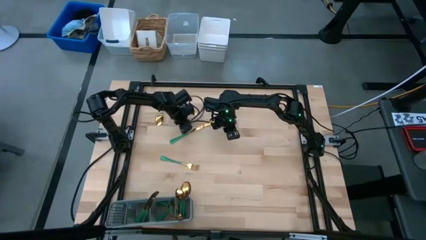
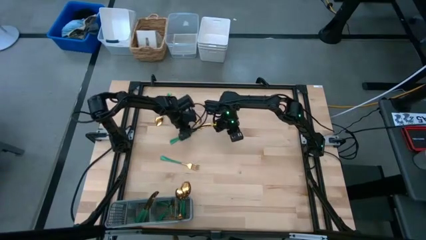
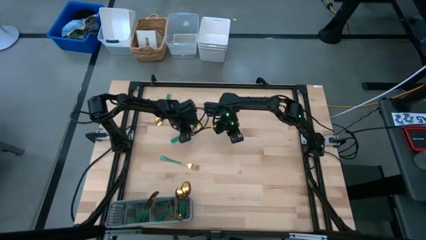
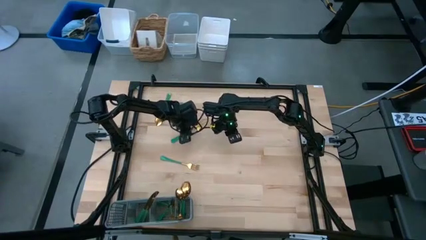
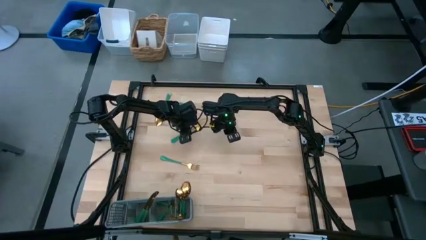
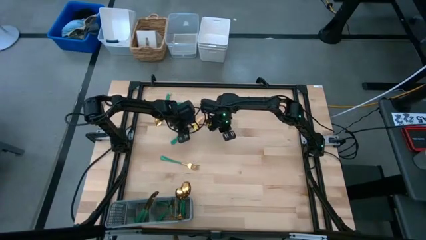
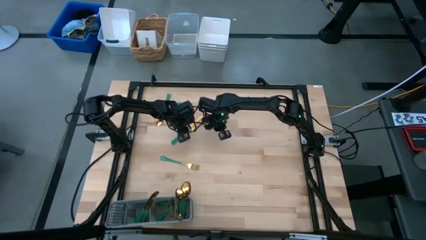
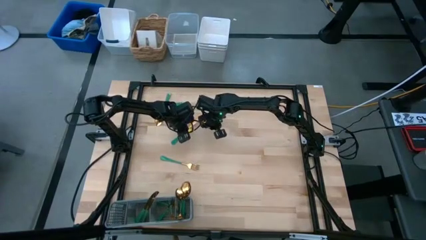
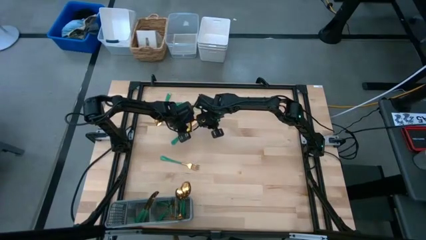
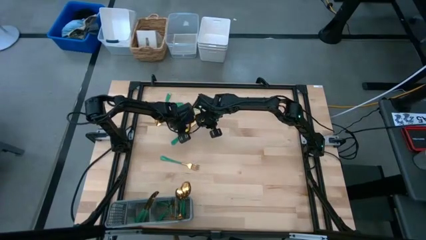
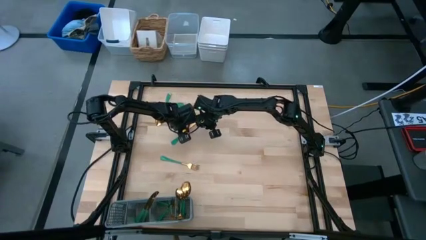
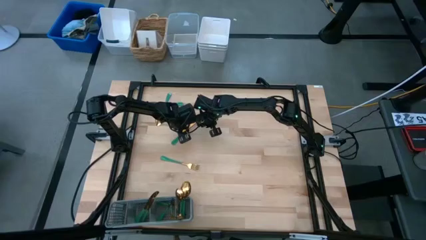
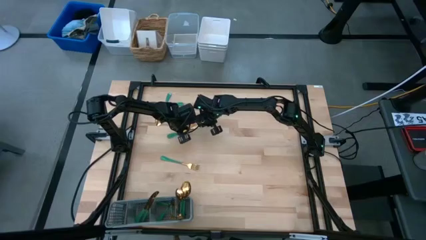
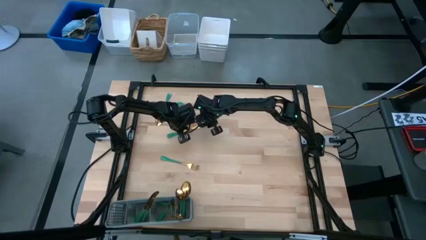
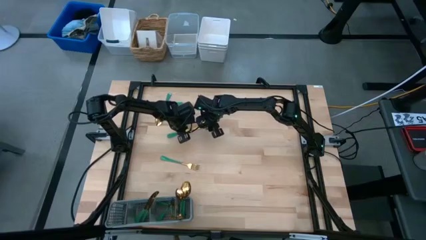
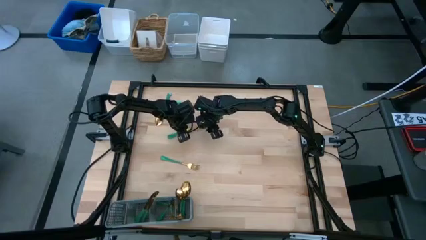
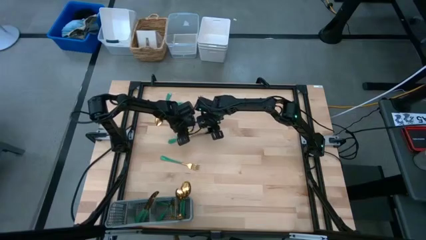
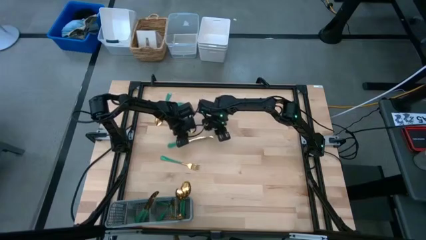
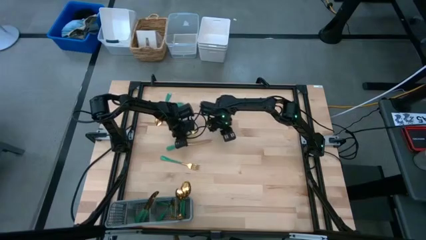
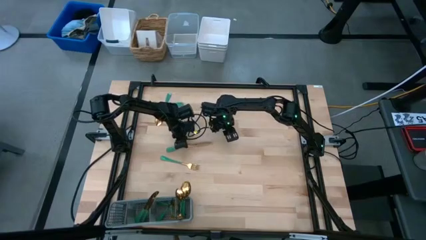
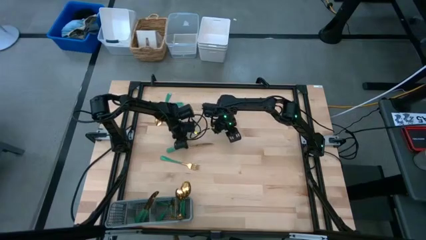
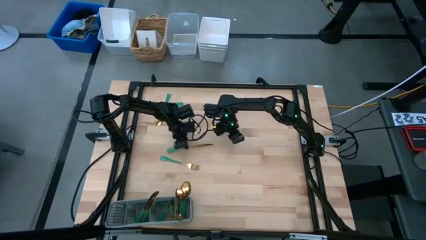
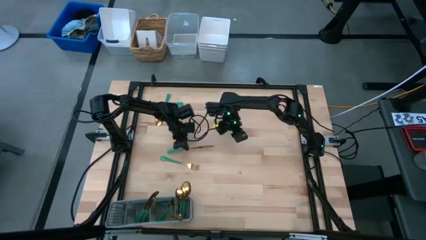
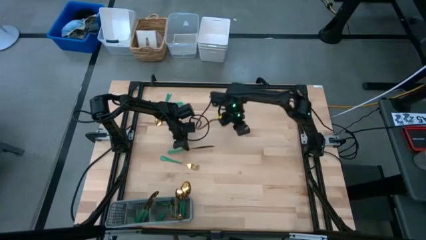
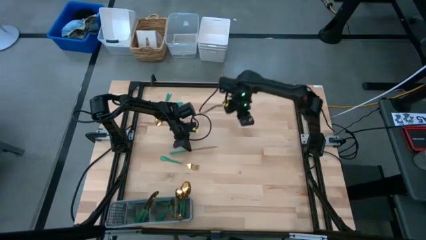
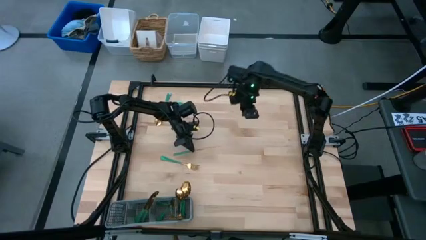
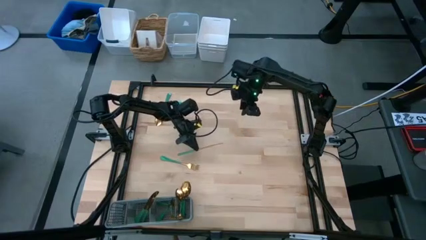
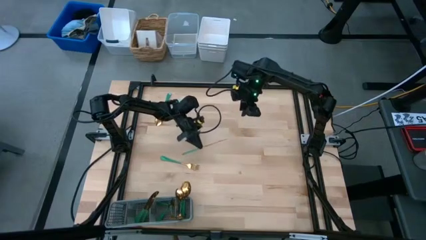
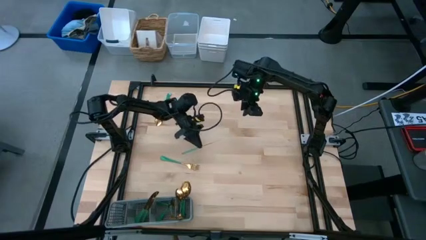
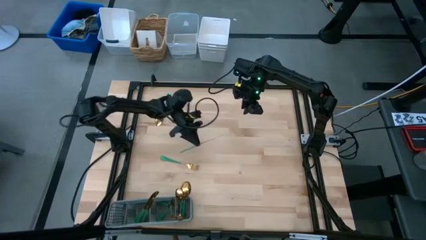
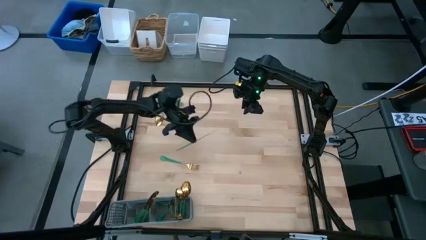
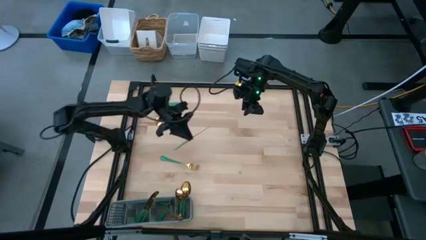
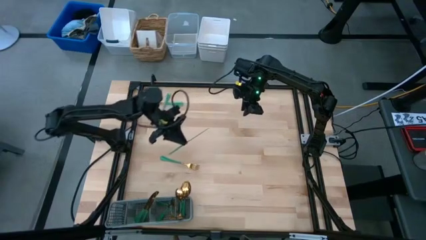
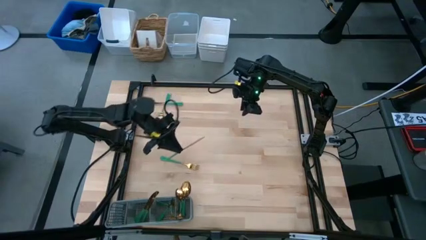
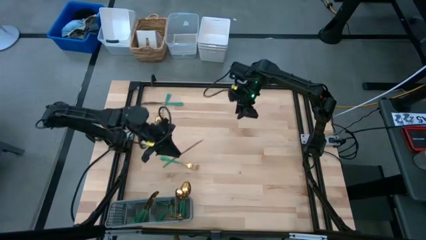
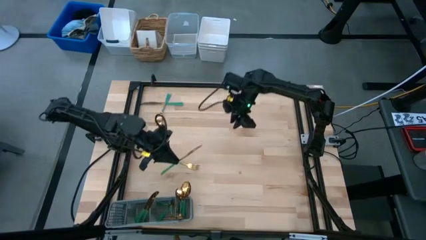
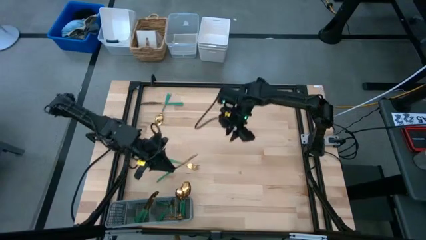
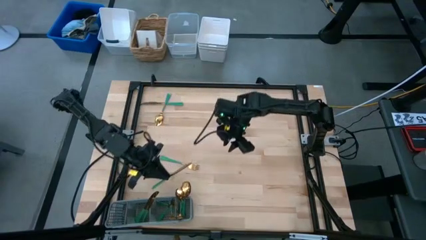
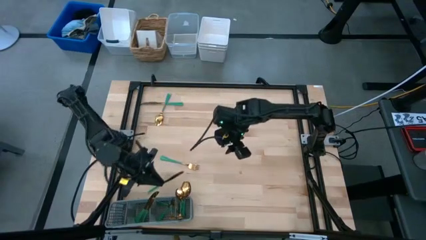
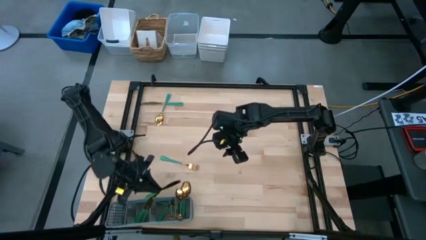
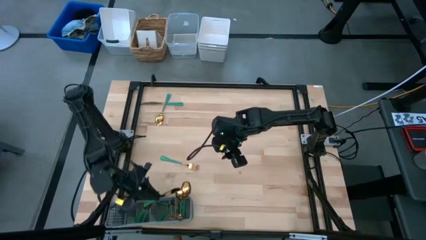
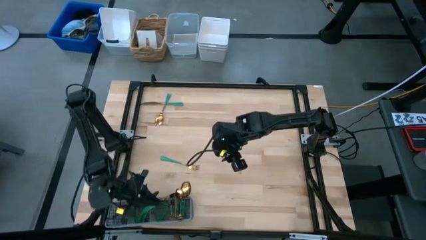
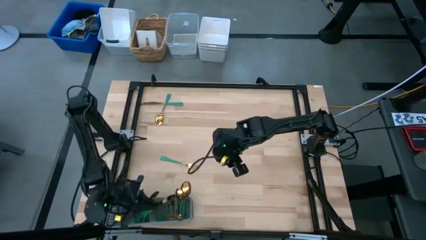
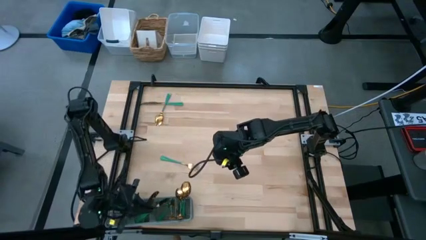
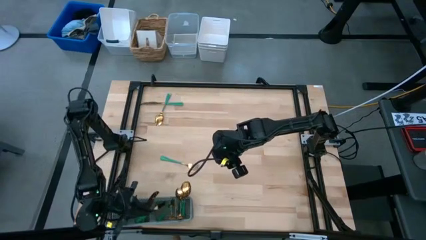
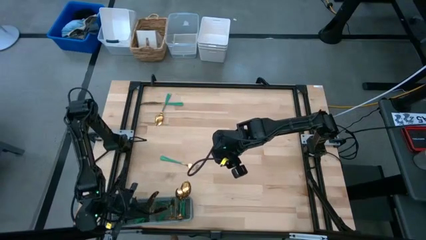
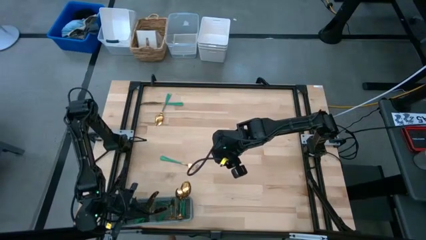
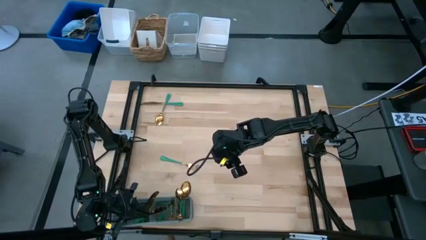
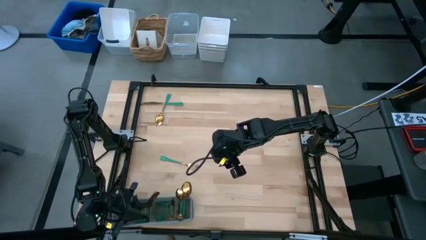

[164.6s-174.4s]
Task: Sort silverware
Put the bottom knife into the cutlery rack

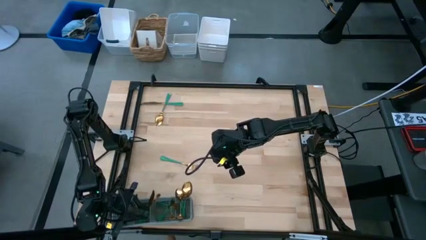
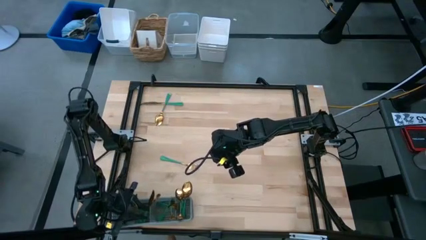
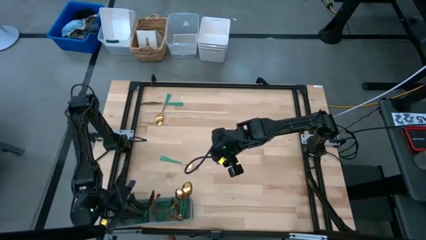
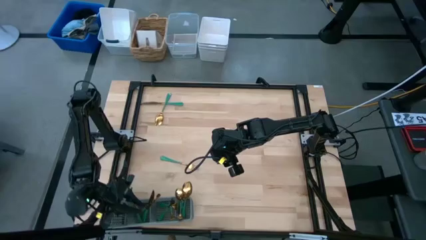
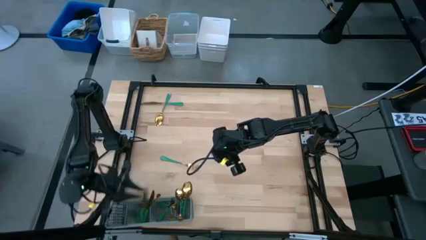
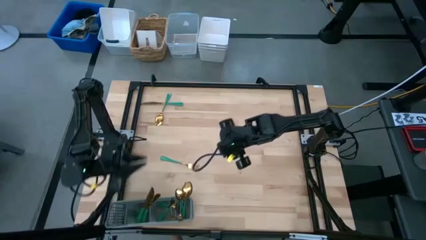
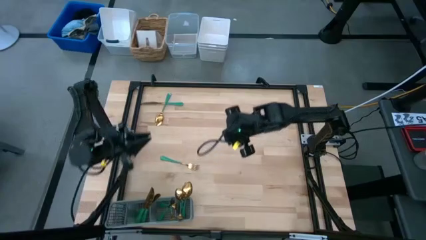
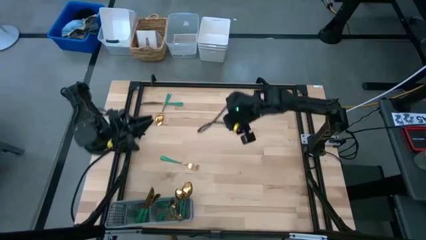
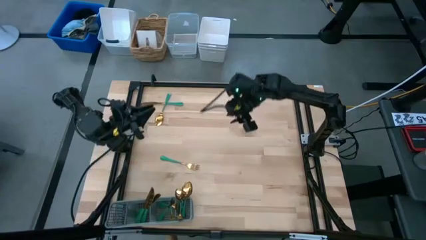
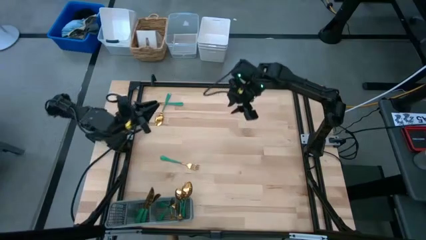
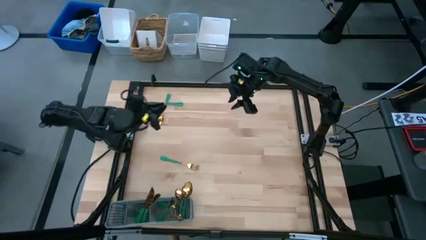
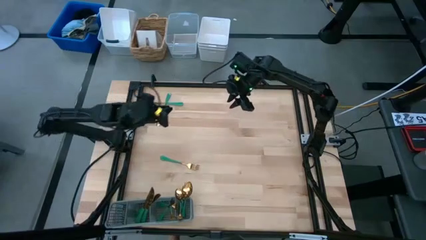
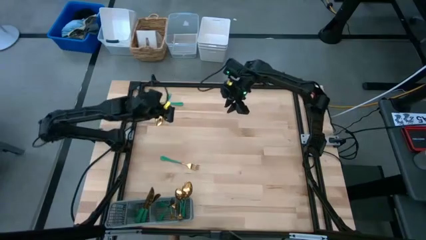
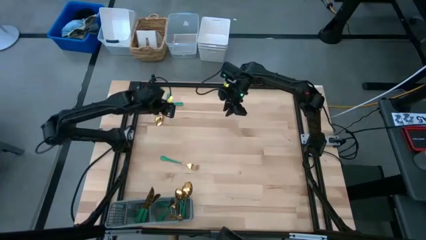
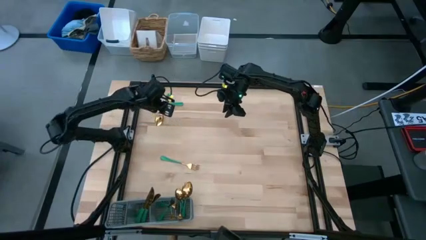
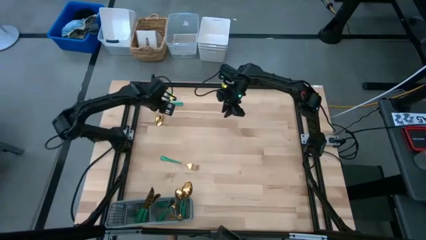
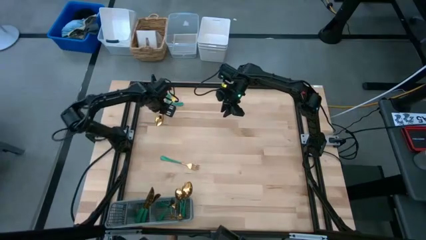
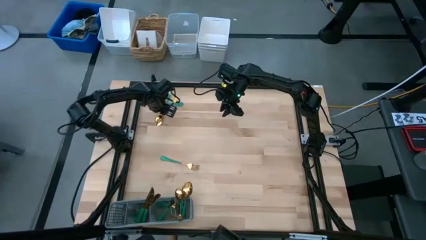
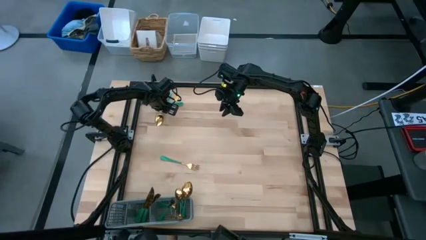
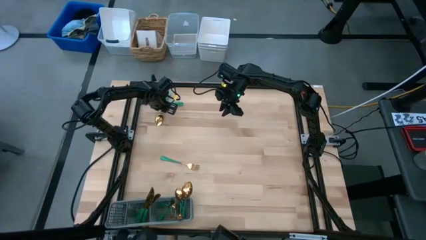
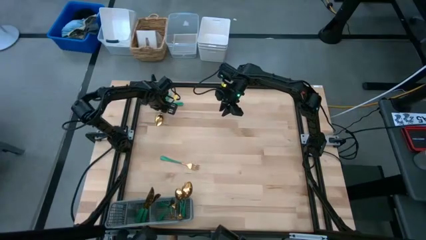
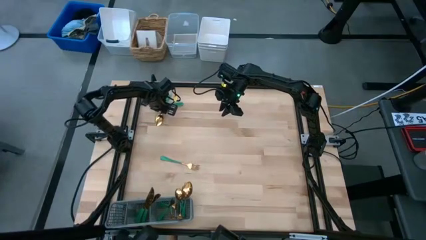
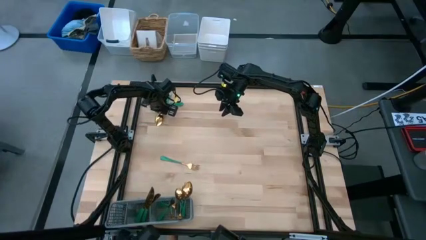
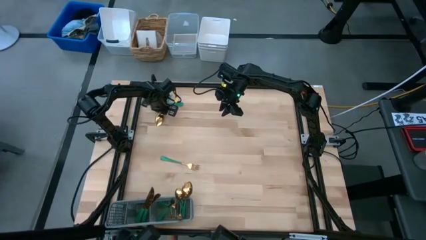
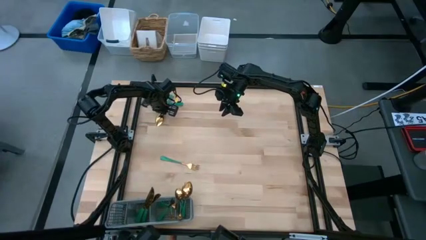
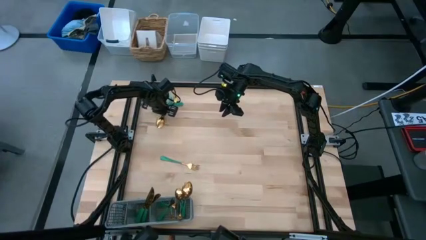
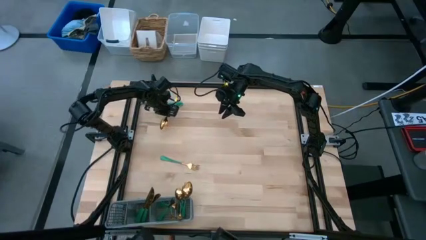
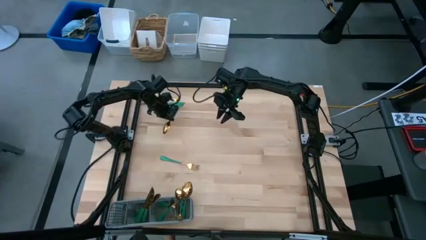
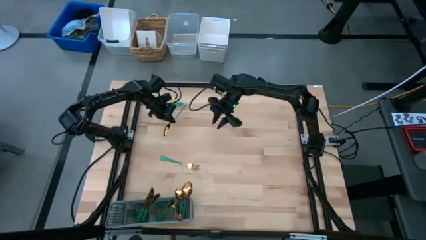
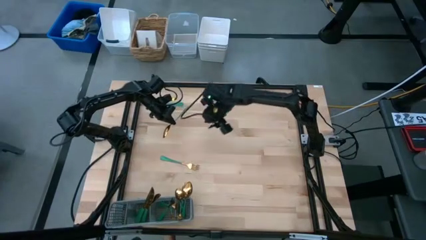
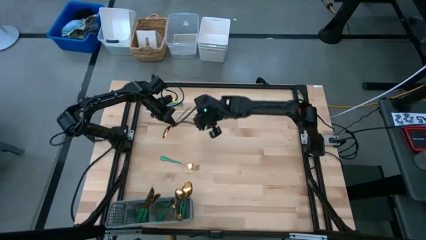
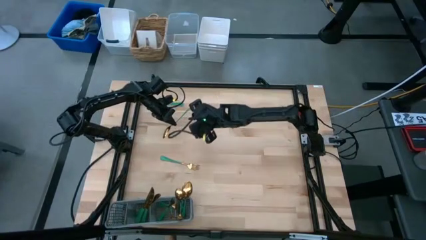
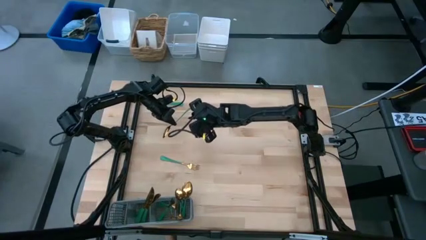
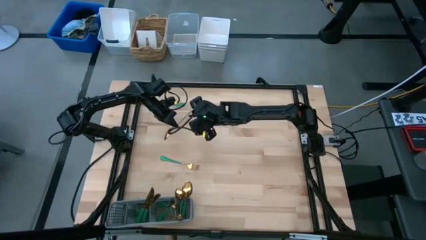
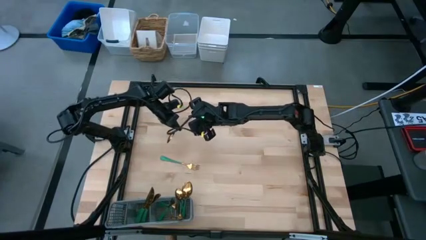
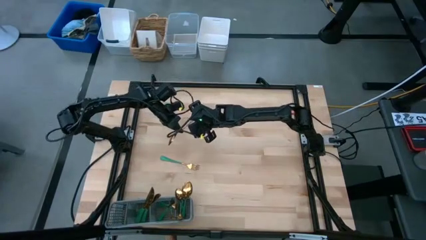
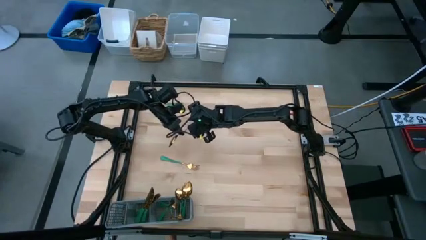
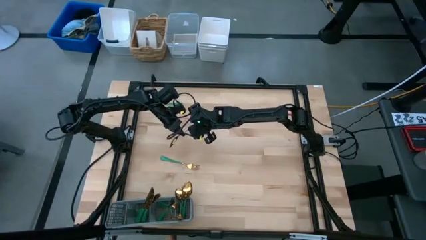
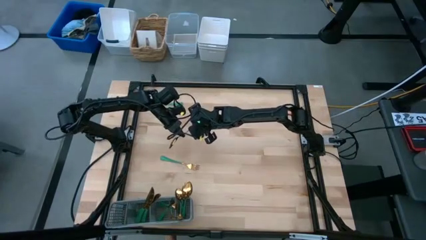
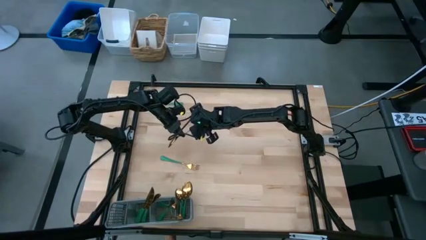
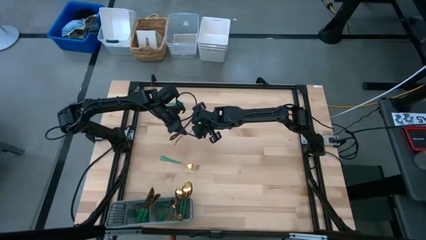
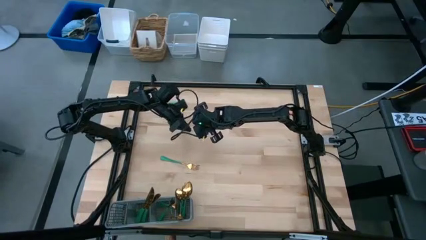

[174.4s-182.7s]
Put the spoon into the cutlery rack
